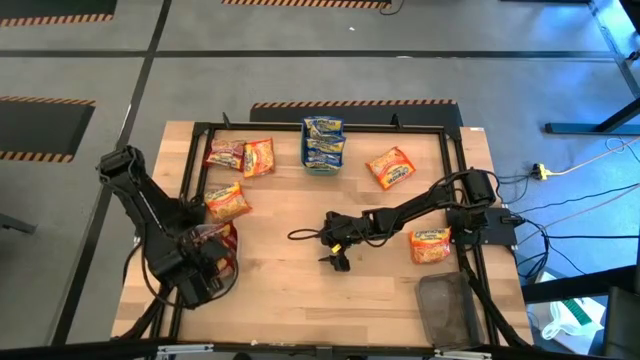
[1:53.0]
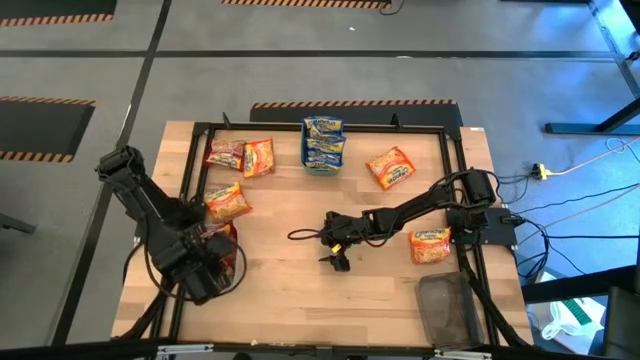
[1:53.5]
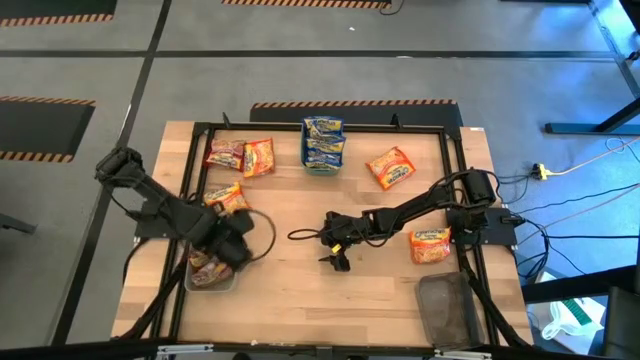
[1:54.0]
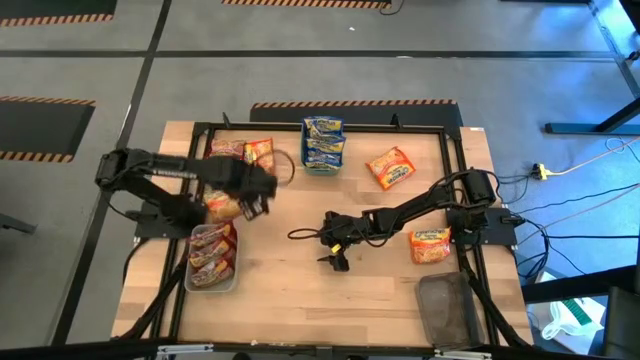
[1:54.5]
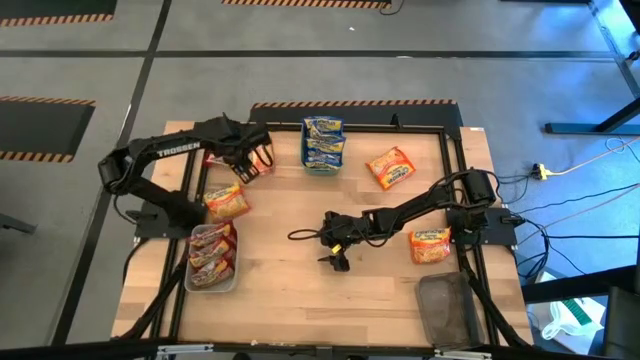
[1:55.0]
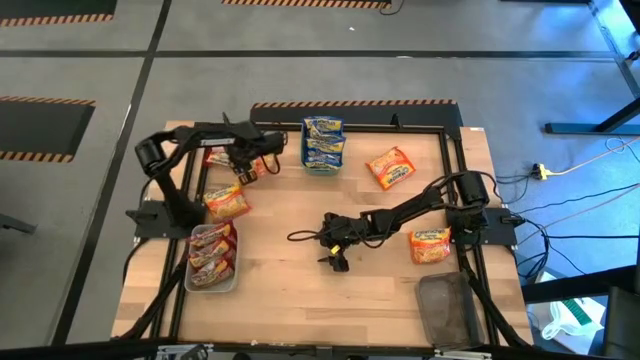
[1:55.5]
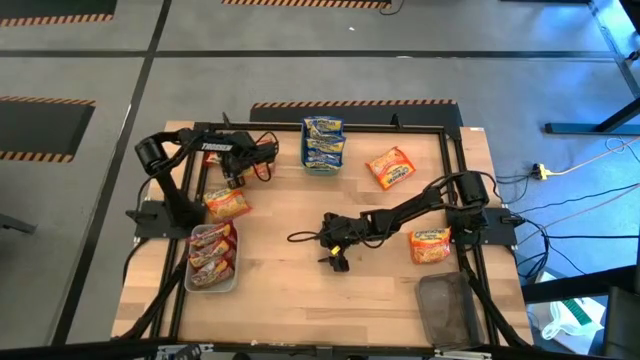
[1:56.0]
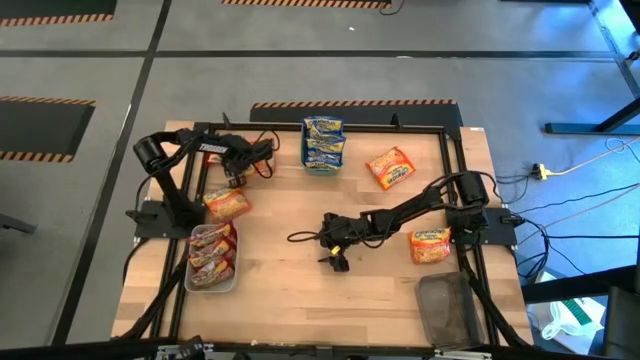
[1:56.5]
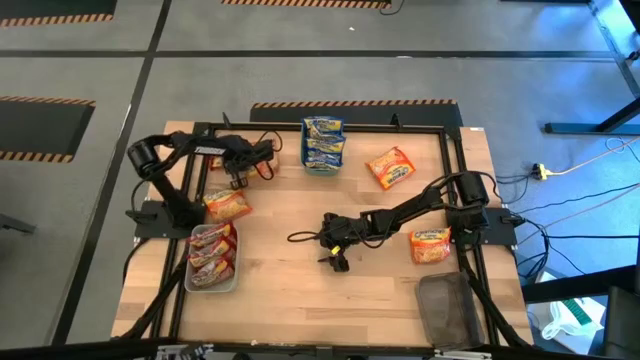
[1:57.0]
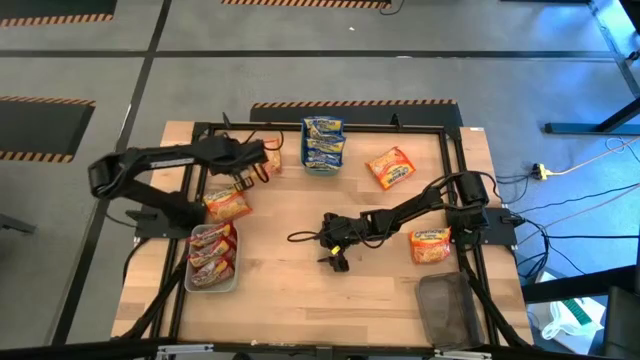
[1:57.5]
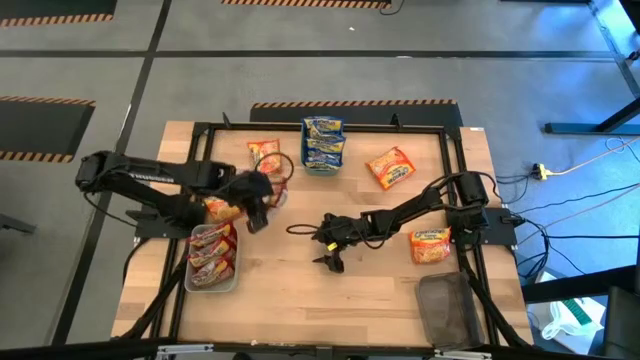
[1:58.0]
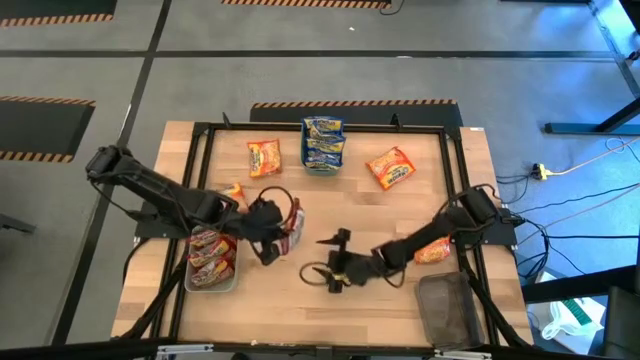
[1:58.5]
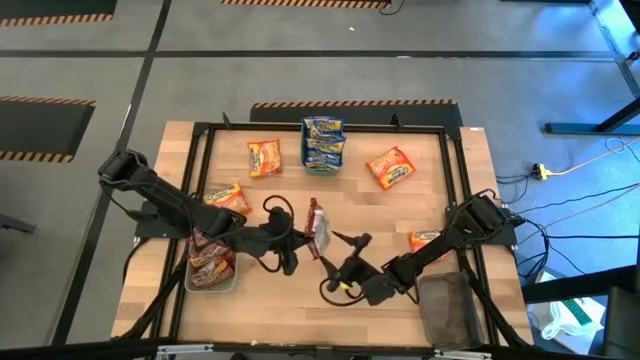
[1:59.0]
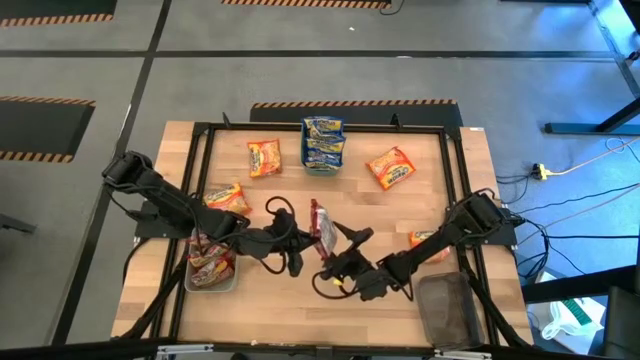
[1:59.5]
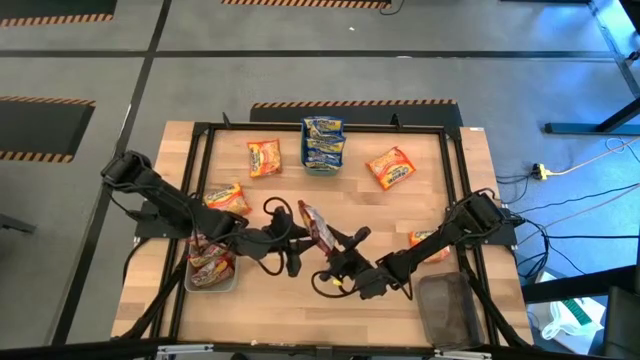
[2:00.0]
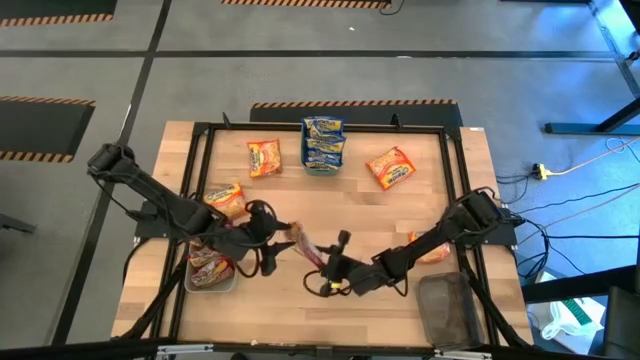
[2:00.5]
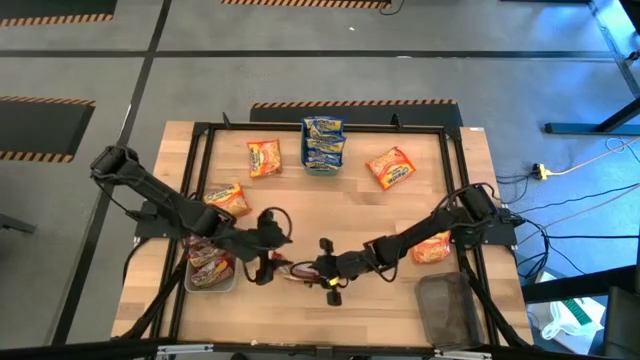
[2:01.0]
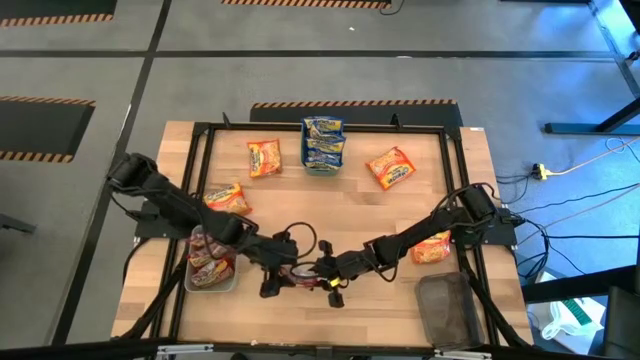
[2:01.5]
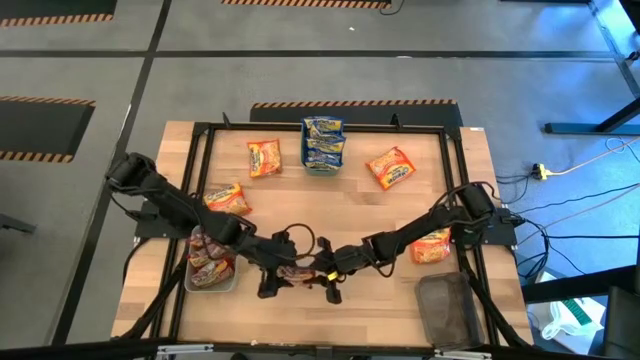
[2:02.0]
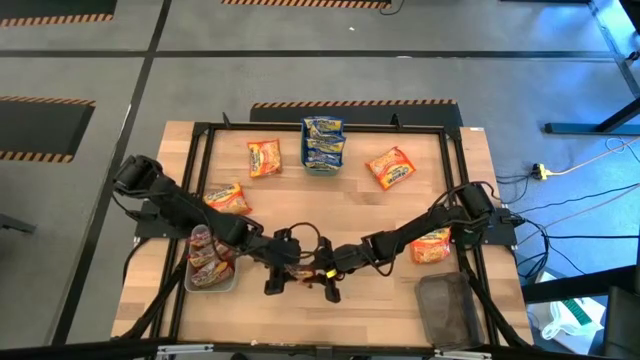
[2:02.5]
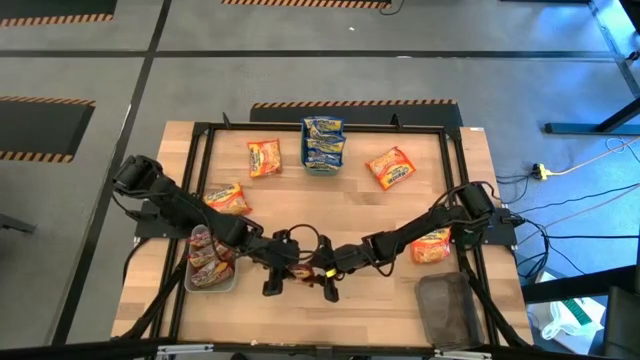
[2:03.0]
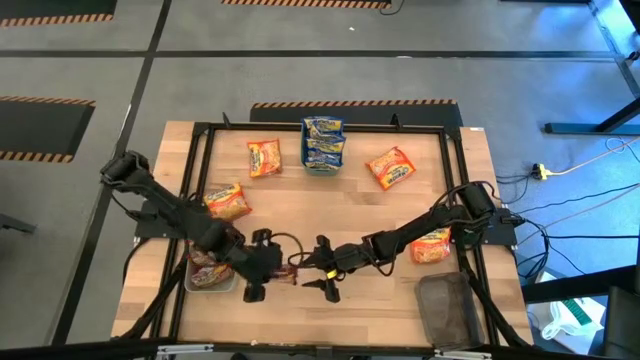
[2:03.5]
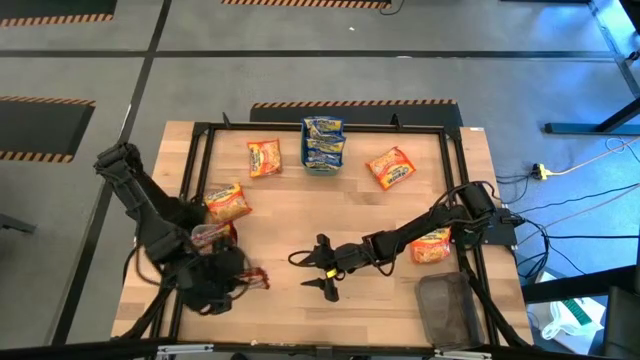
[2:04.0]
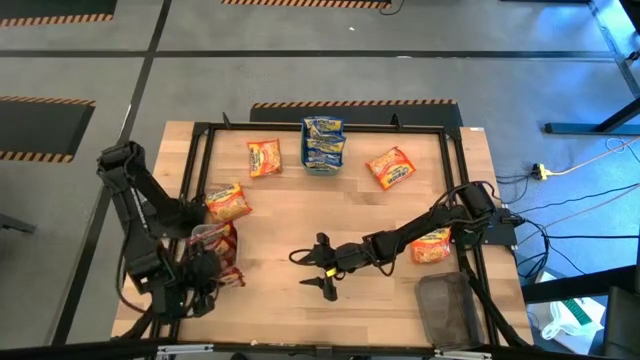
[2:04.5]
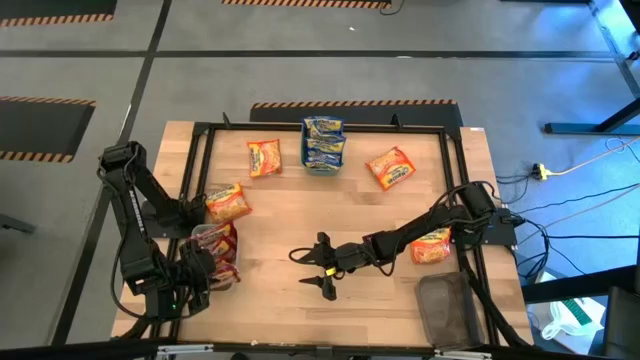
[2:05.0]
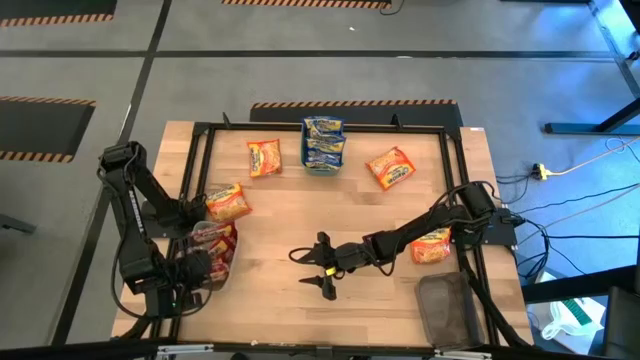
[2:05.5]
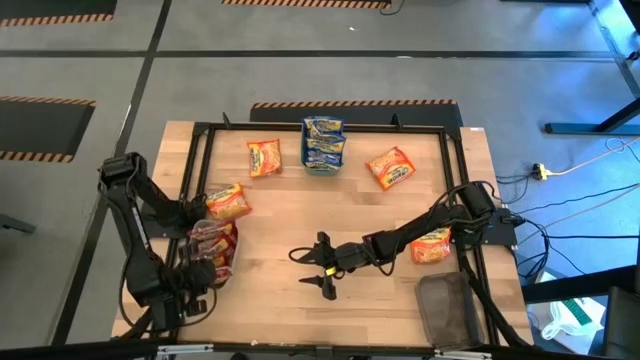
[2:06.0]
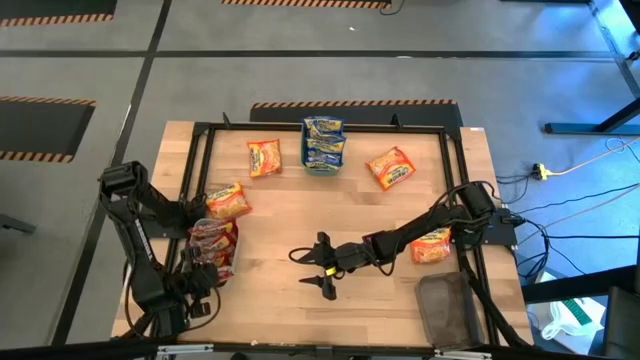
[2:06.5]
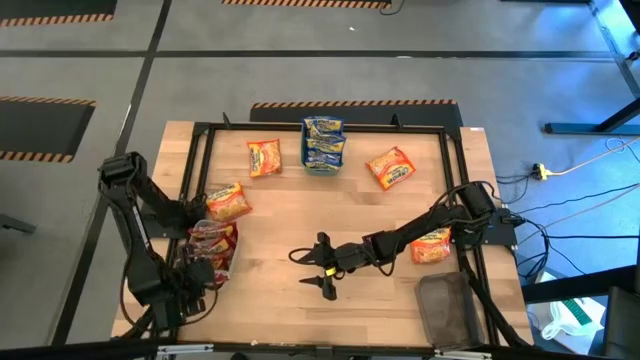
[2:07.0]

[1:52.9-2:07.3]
Task: Sort Maruchan noodles
Put the red noodle pack into the gray bin

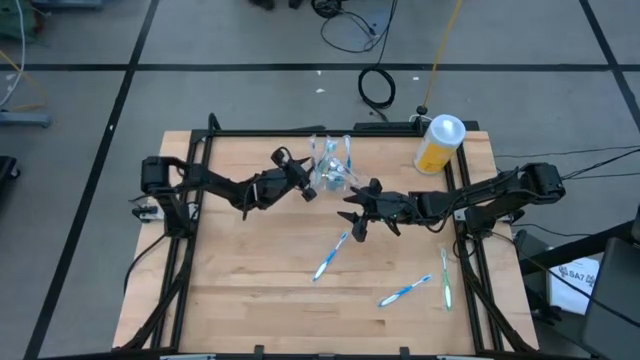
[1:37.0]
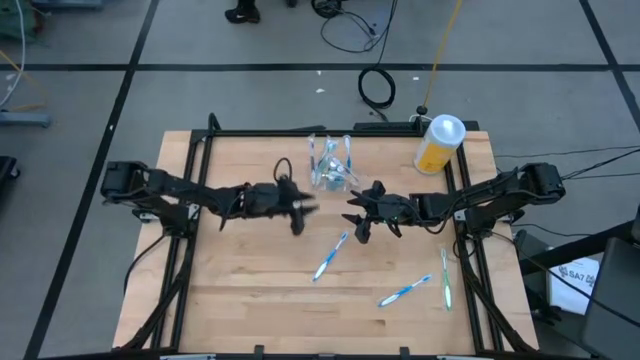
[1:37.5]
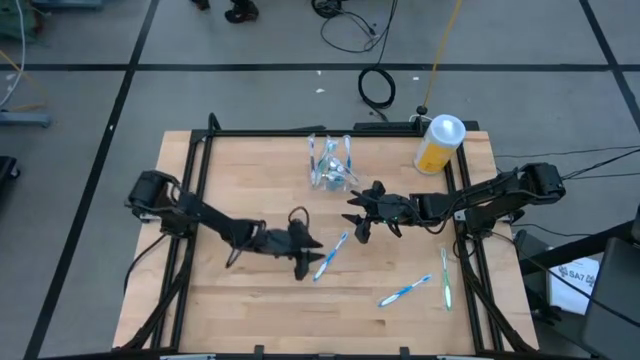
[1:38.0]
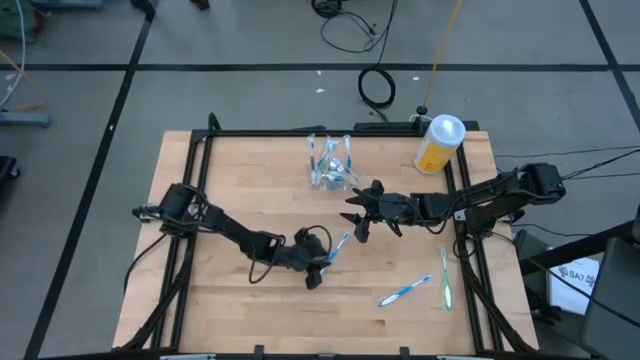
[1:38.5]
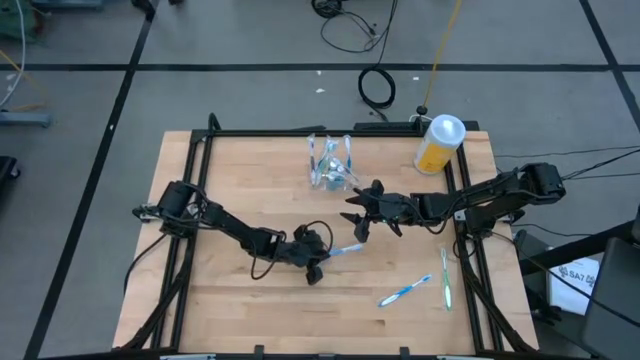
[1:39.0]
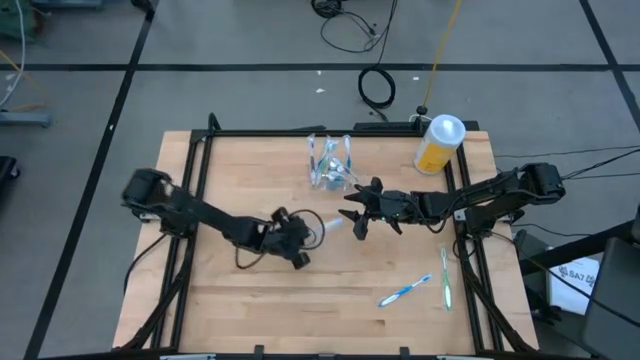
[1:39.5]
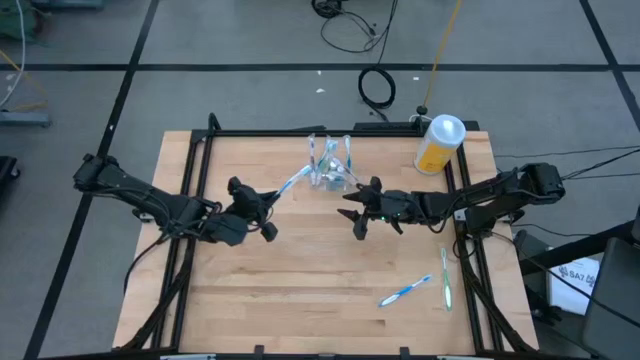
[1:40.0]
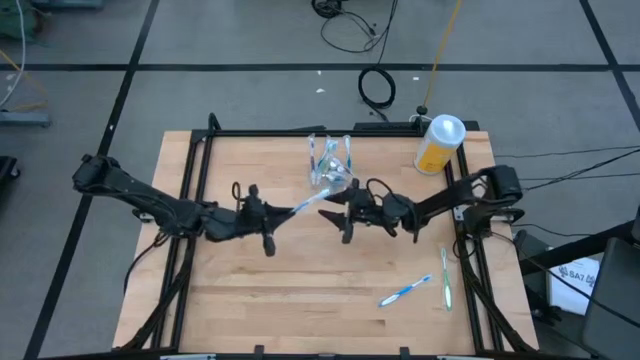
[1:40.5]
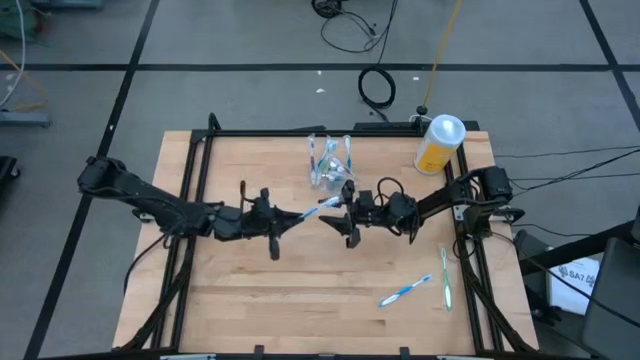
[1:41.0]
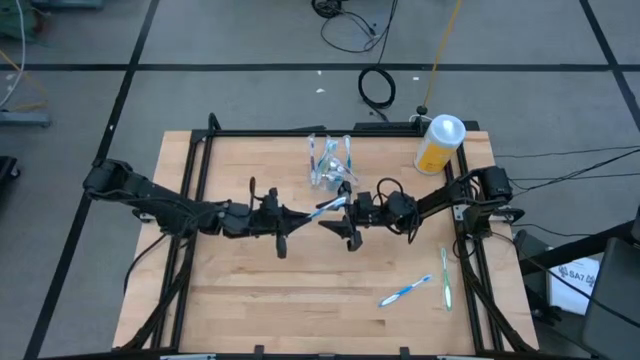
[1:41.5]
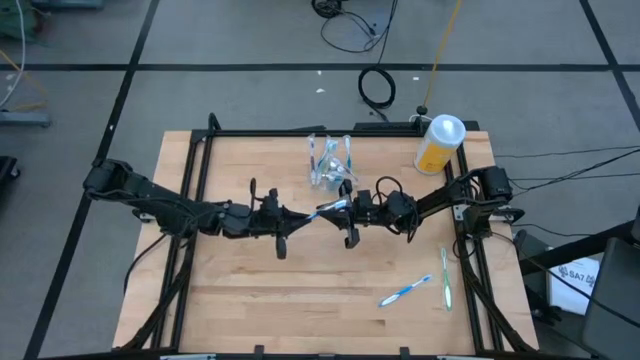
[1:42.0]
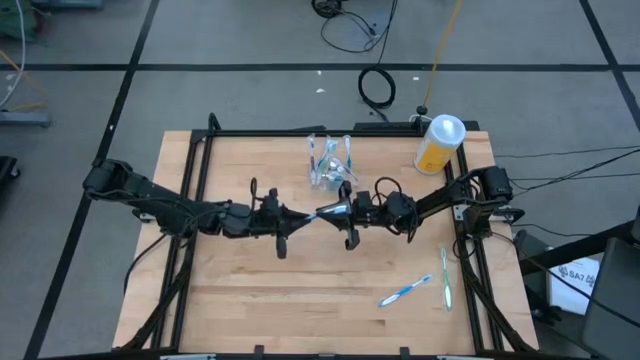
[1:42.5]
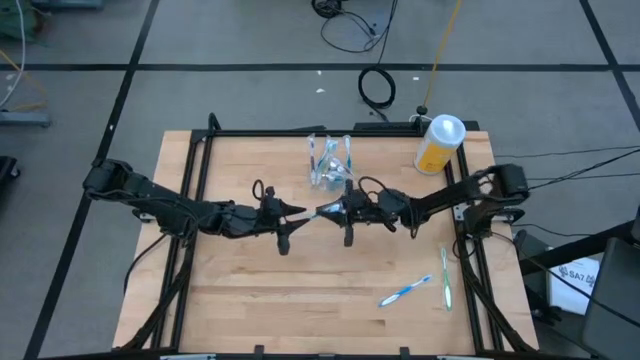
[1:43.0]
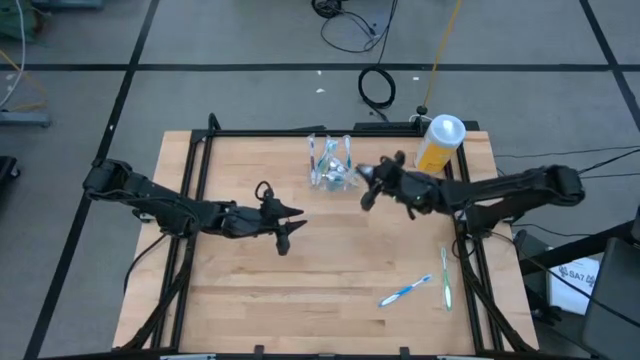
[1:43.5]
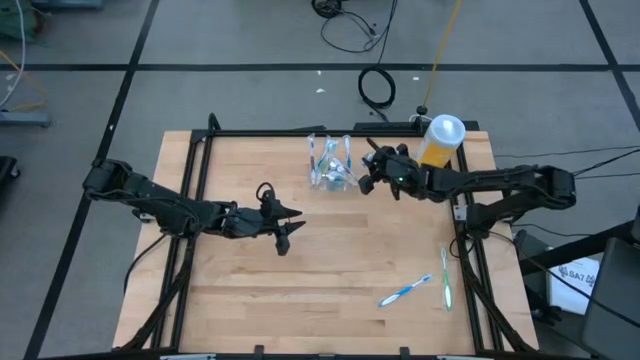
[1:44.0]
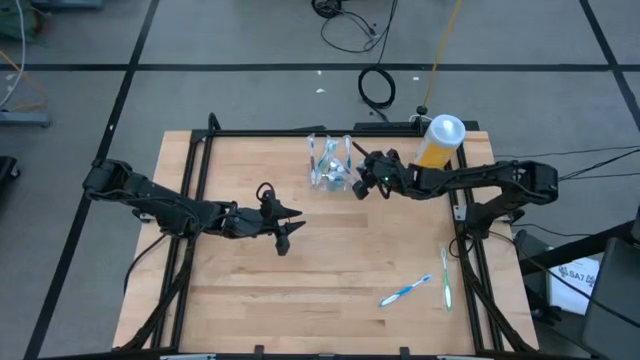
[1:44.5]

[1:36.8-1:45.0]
Task: Pick & Place toothbrushing station
Put the blue toothbrush into the transparent organizer
